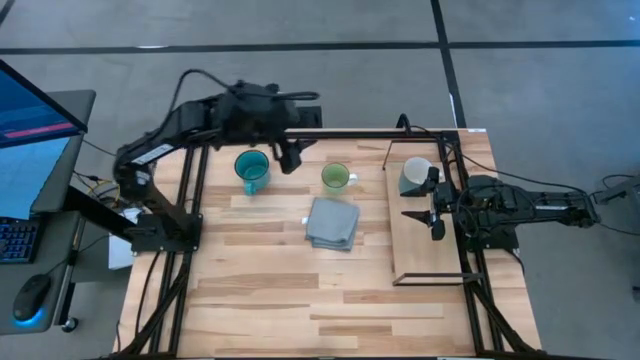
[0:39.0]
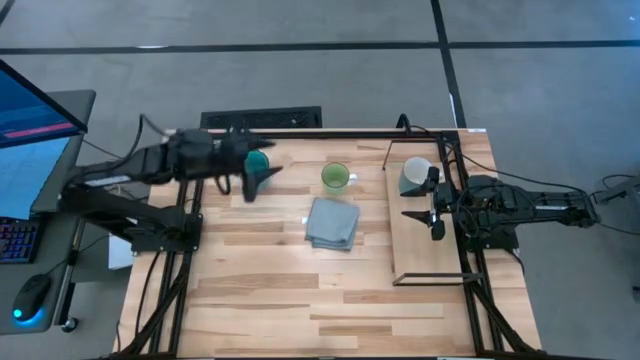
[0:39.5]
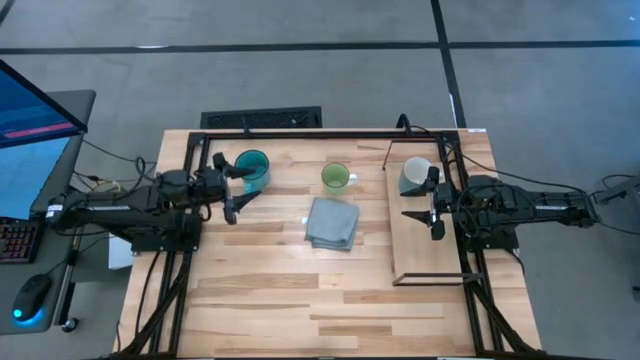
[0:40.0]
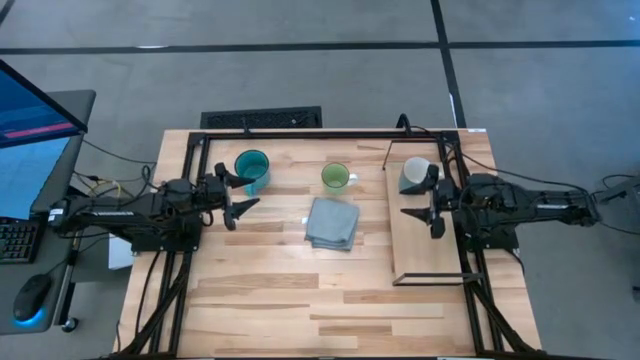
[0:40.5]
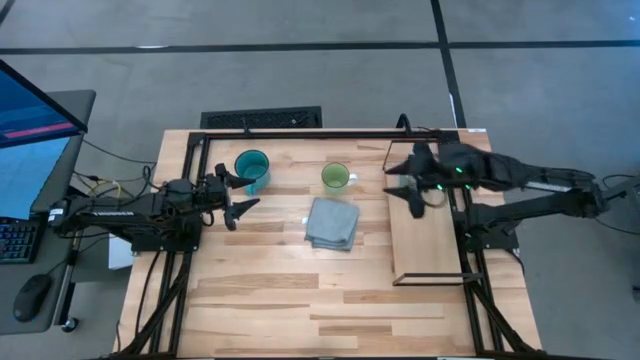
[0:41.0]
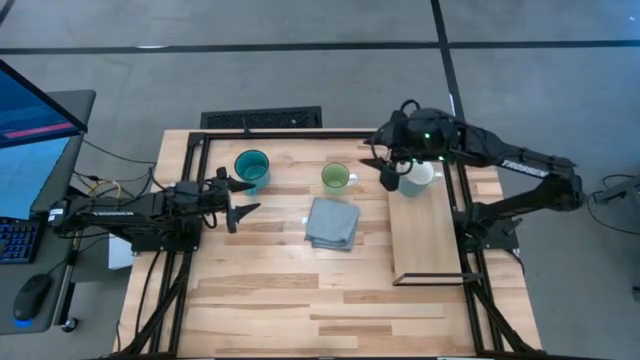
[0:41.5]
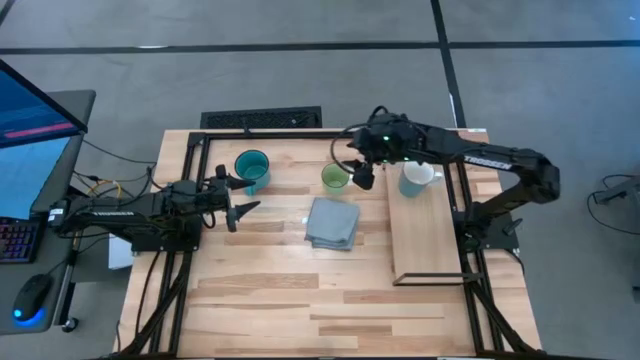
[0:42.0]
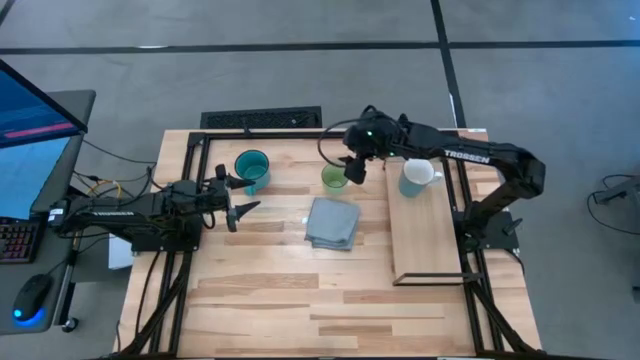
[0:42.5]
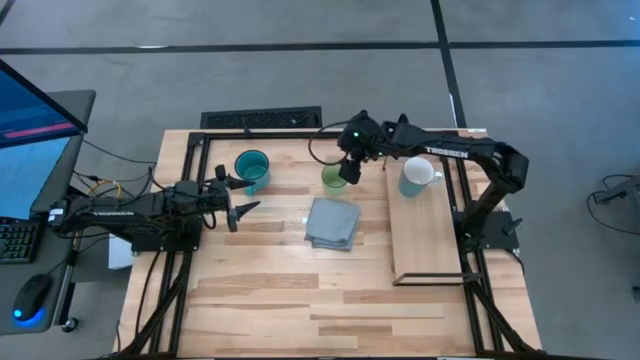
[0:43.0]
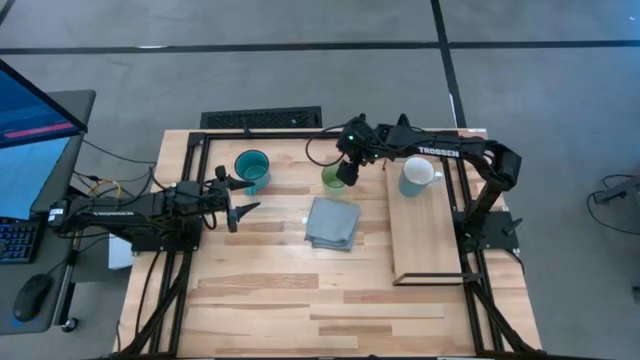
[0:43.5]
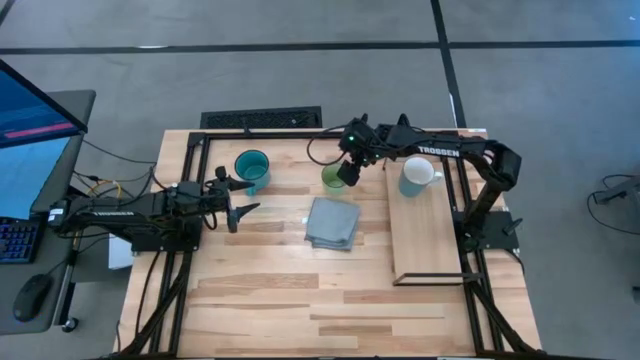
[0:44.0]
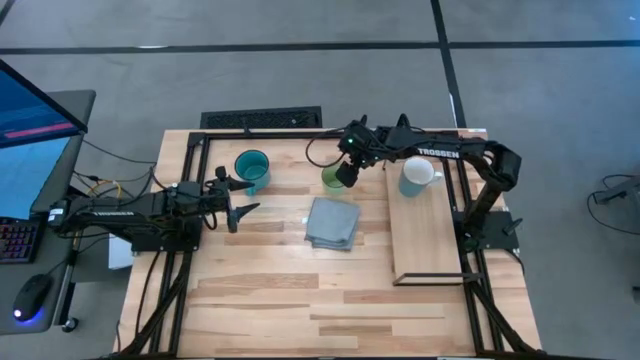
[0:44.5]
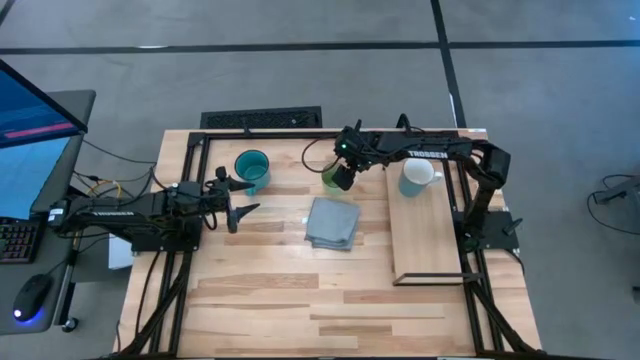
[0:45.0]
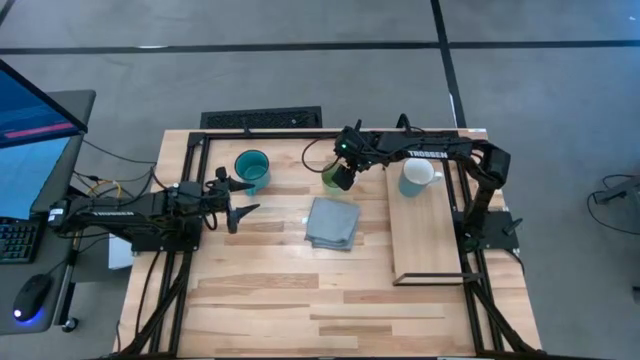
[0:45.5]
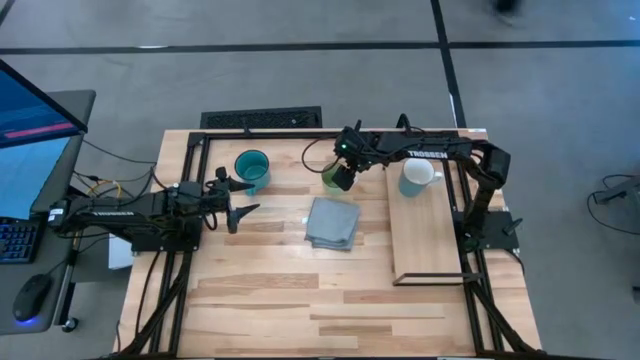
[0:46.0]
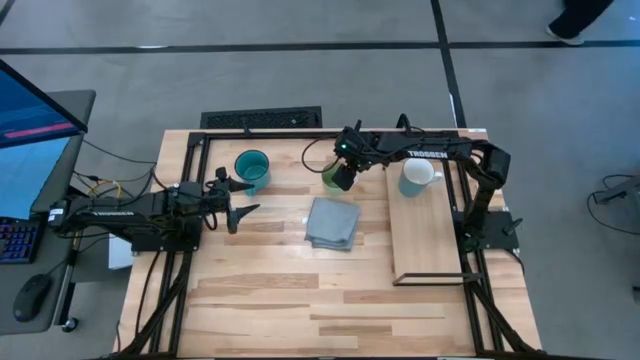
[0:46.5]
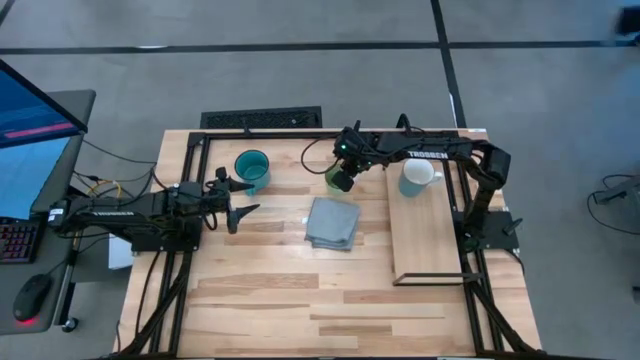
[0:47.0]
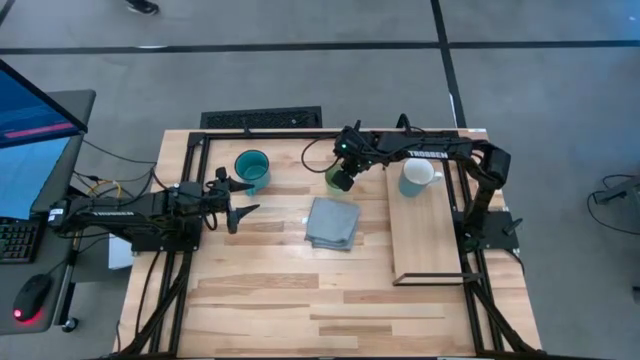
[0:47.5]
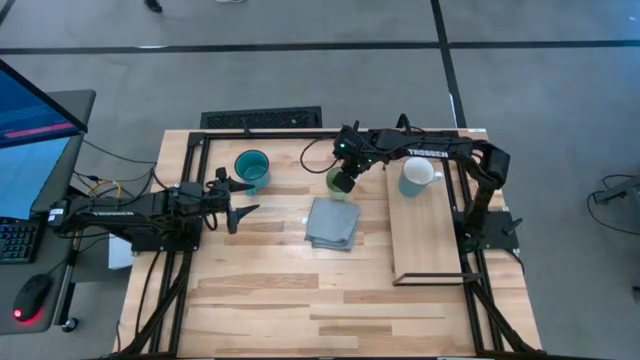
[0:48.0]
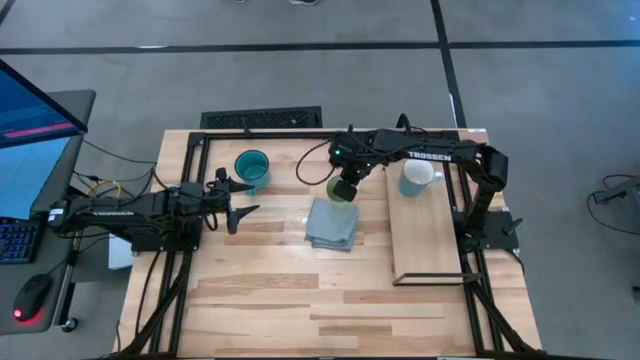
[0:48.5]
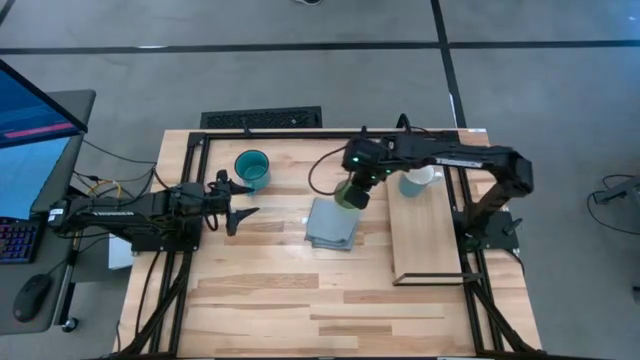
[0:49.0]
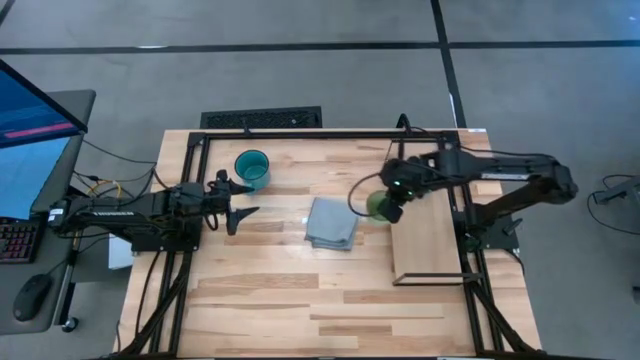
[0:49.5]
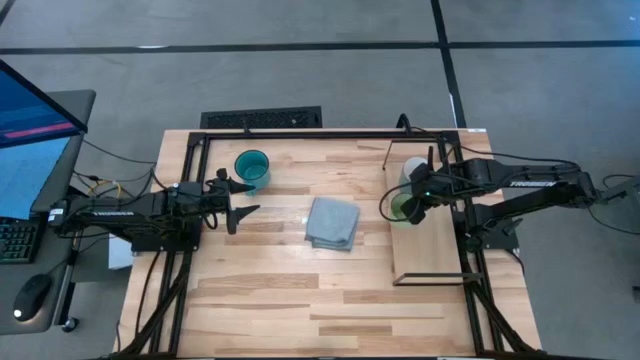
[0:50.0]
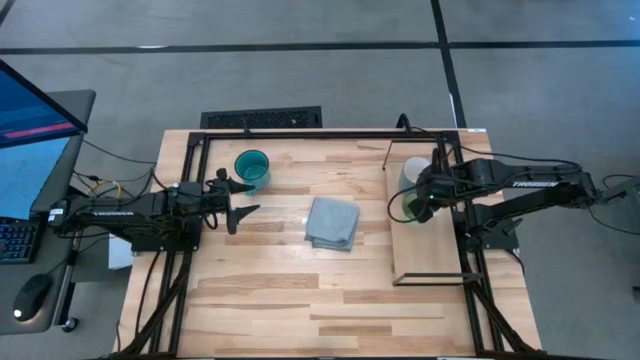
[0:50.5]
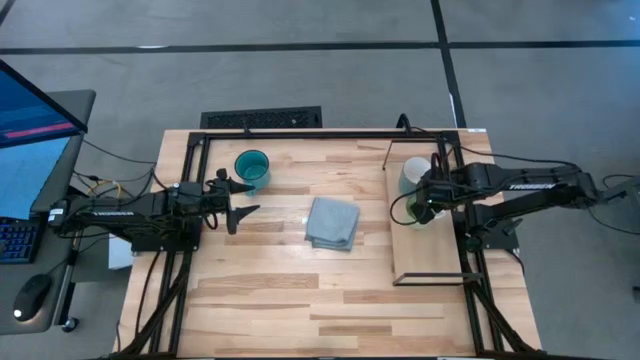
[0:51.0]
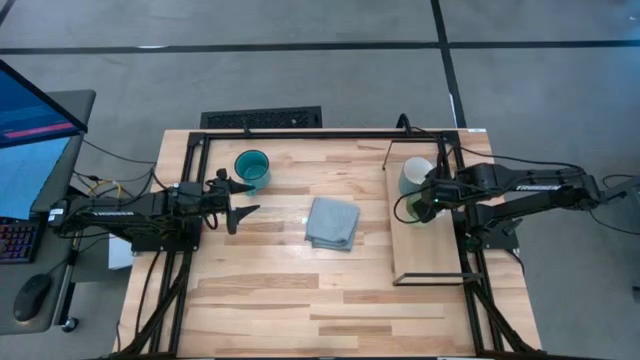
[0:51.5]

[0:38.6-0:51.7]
Task: Stack small to large cups/mugs on shelf
Put the green mug on the shelf
